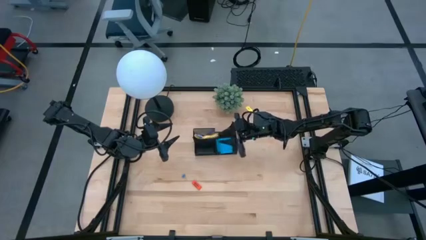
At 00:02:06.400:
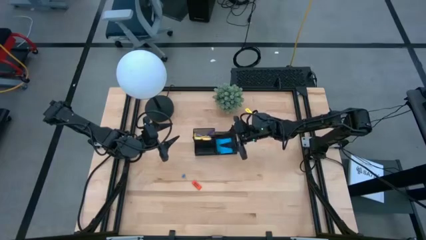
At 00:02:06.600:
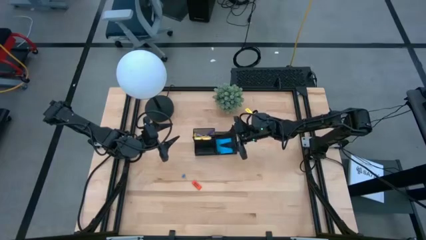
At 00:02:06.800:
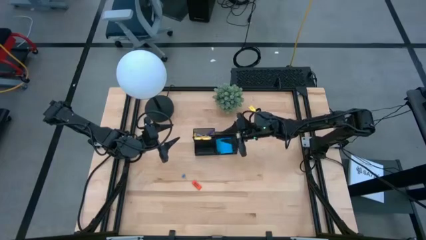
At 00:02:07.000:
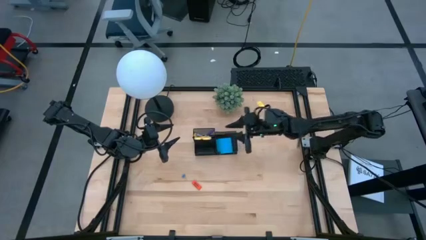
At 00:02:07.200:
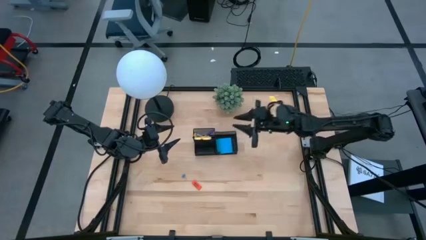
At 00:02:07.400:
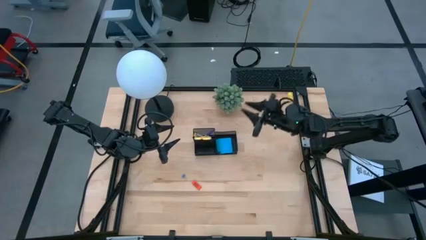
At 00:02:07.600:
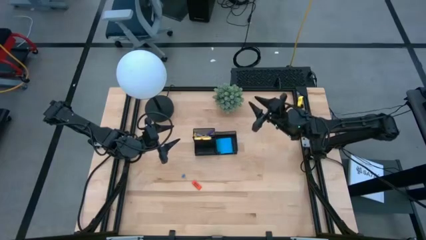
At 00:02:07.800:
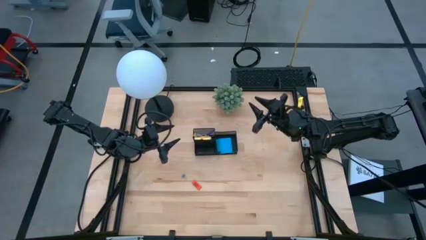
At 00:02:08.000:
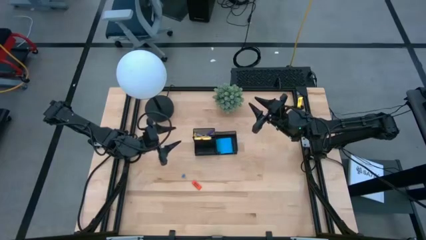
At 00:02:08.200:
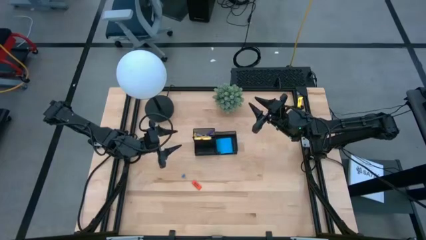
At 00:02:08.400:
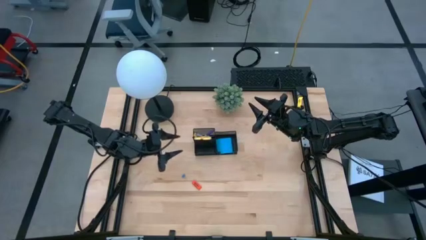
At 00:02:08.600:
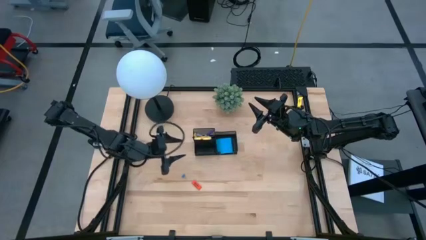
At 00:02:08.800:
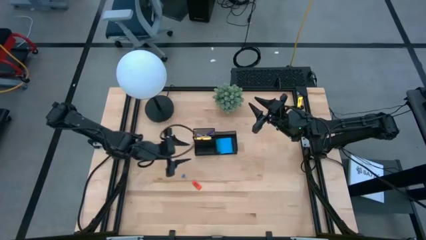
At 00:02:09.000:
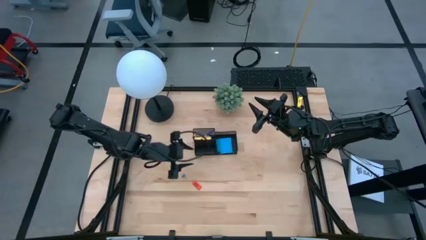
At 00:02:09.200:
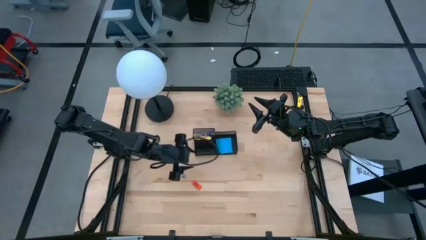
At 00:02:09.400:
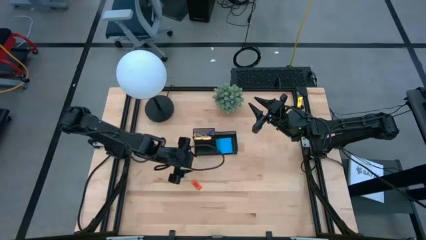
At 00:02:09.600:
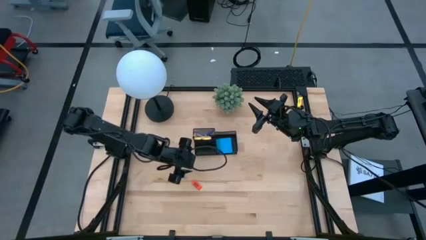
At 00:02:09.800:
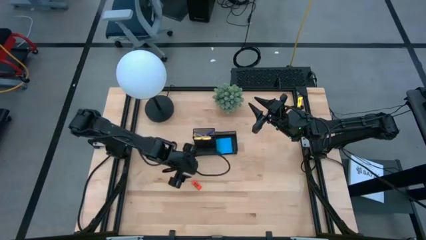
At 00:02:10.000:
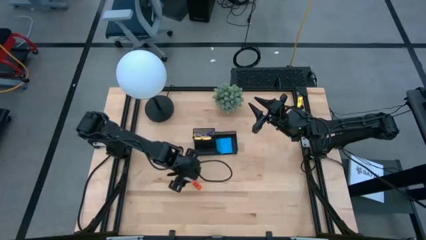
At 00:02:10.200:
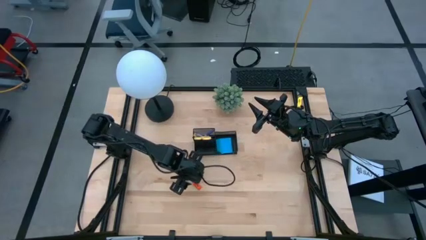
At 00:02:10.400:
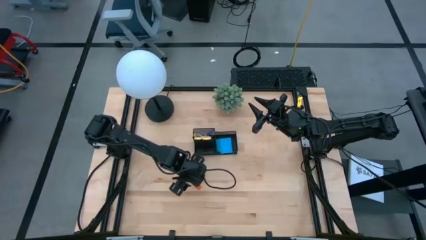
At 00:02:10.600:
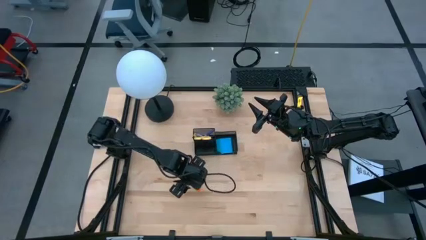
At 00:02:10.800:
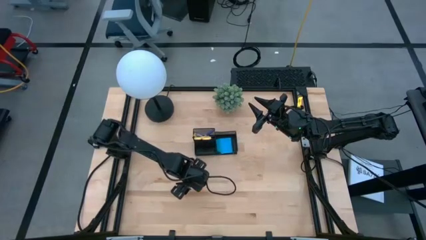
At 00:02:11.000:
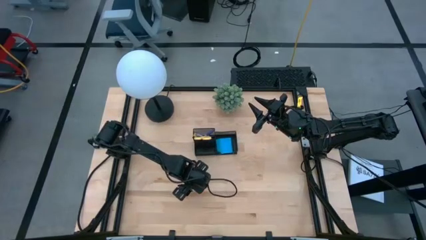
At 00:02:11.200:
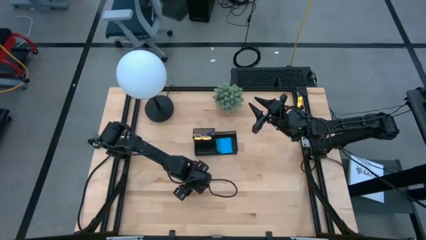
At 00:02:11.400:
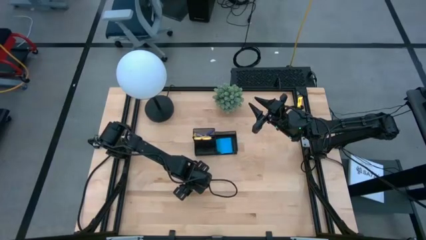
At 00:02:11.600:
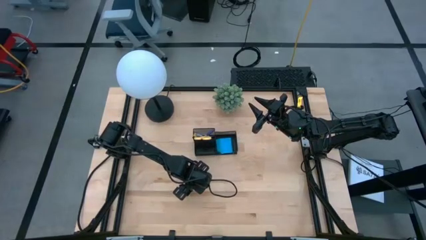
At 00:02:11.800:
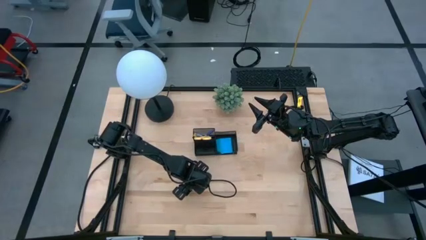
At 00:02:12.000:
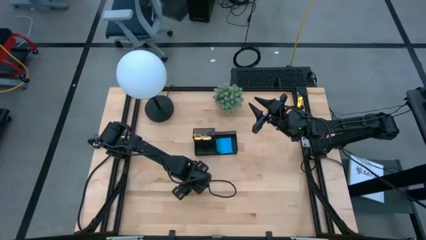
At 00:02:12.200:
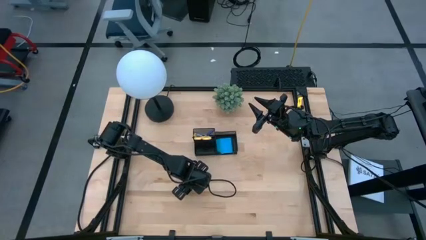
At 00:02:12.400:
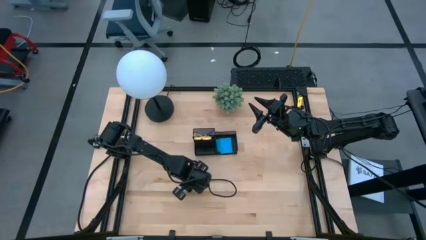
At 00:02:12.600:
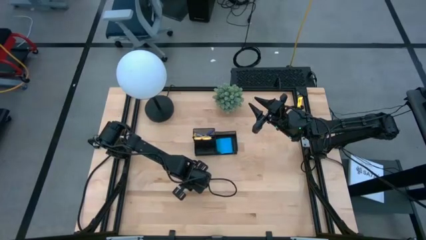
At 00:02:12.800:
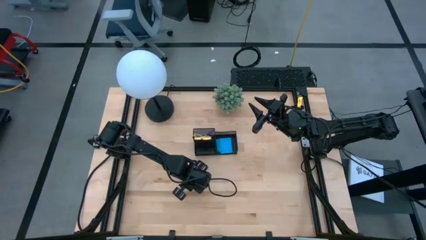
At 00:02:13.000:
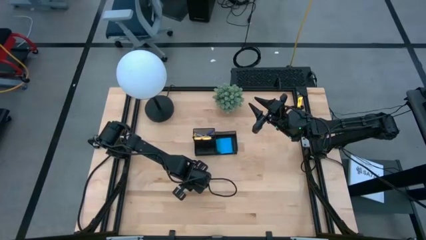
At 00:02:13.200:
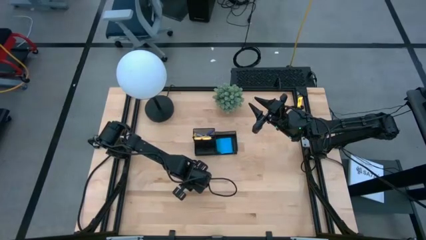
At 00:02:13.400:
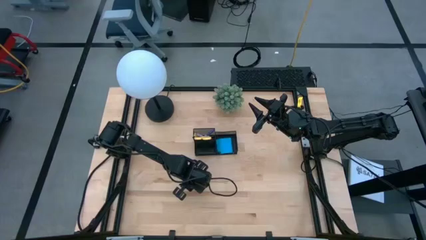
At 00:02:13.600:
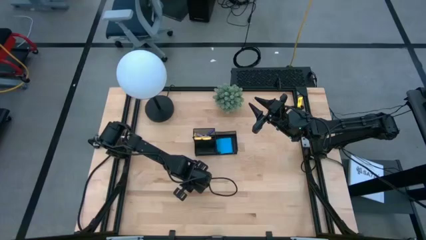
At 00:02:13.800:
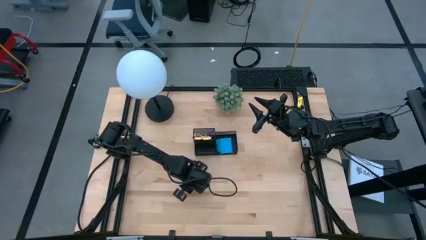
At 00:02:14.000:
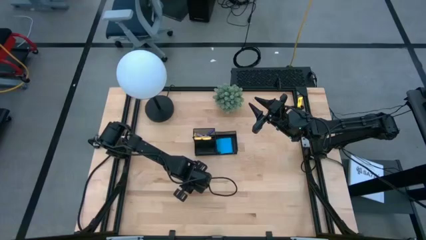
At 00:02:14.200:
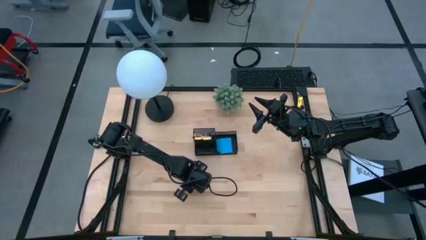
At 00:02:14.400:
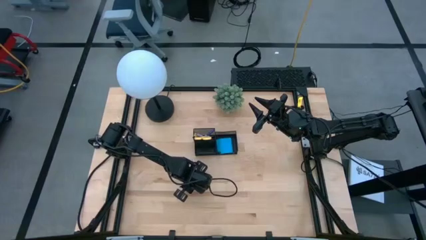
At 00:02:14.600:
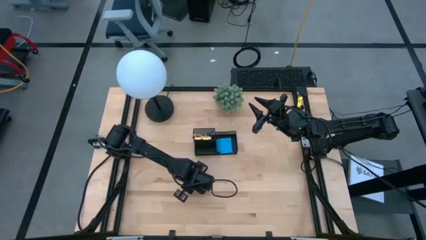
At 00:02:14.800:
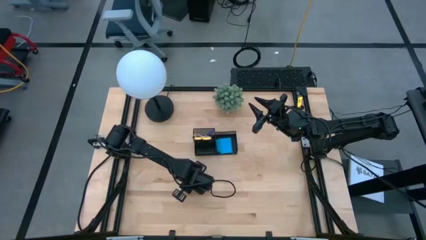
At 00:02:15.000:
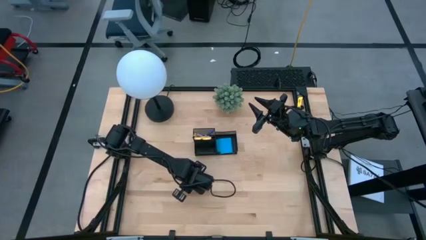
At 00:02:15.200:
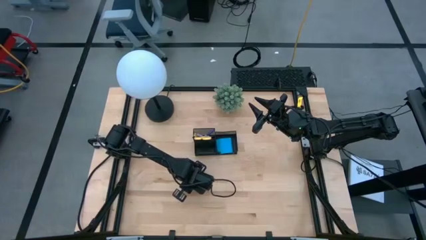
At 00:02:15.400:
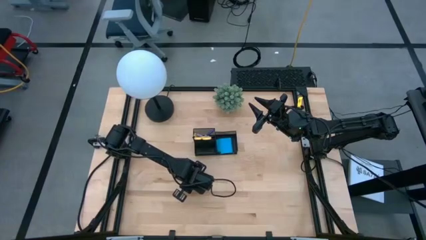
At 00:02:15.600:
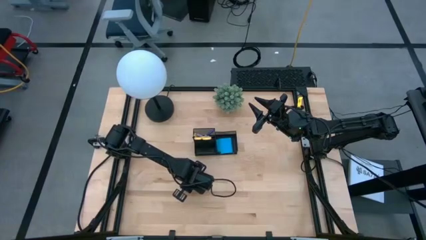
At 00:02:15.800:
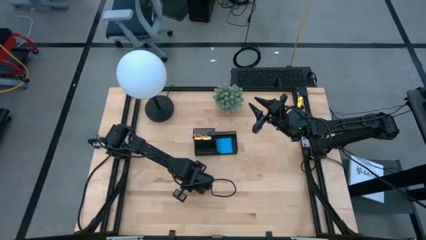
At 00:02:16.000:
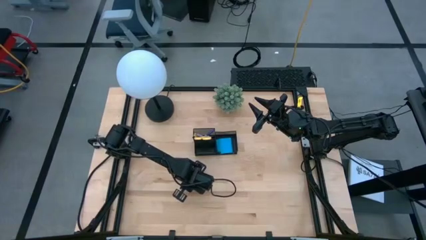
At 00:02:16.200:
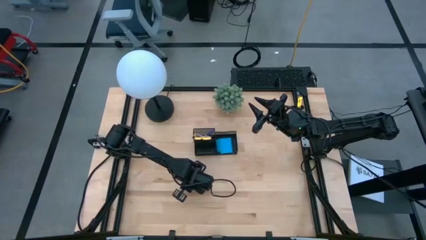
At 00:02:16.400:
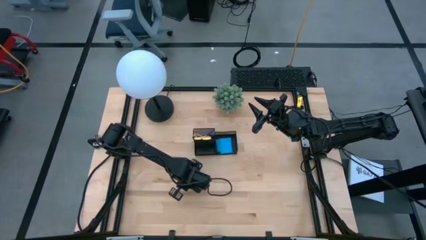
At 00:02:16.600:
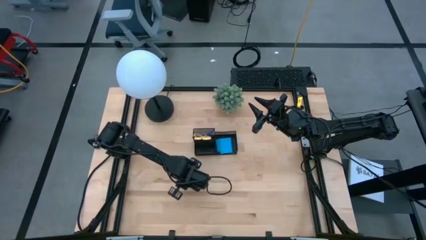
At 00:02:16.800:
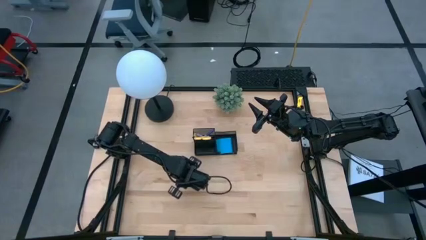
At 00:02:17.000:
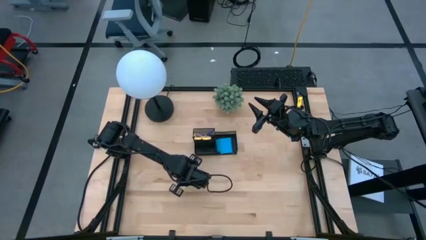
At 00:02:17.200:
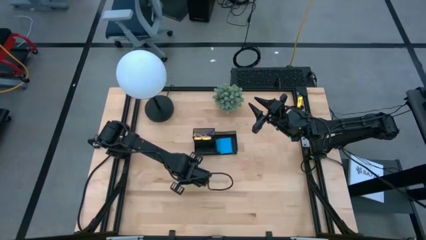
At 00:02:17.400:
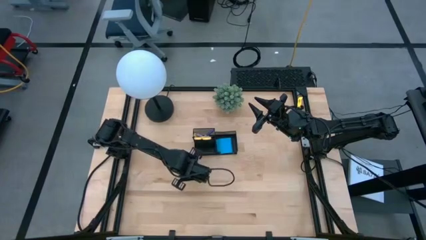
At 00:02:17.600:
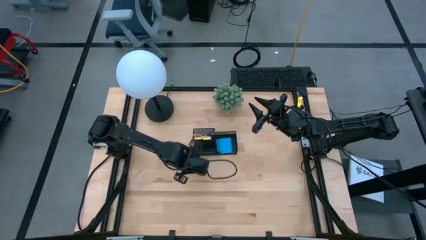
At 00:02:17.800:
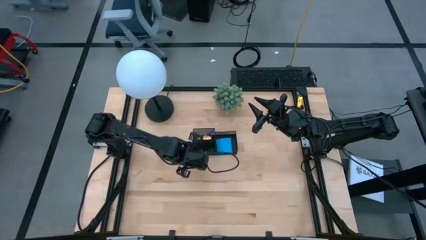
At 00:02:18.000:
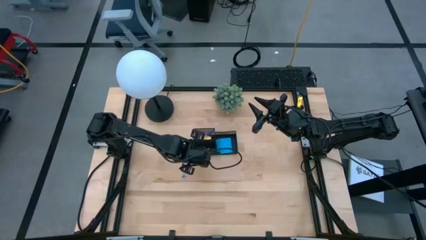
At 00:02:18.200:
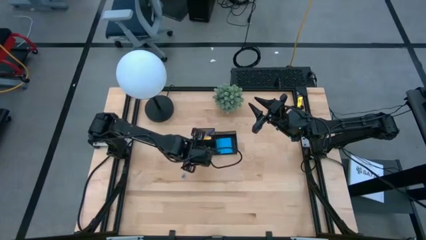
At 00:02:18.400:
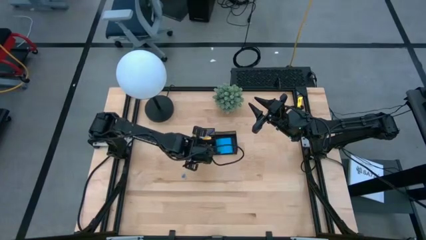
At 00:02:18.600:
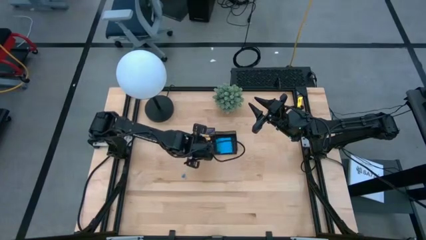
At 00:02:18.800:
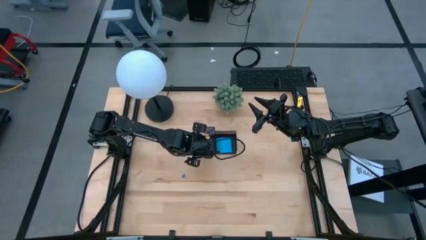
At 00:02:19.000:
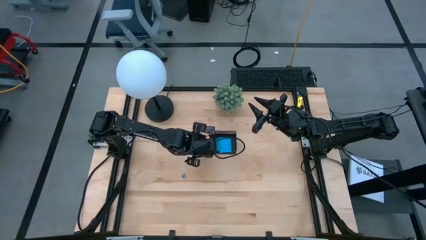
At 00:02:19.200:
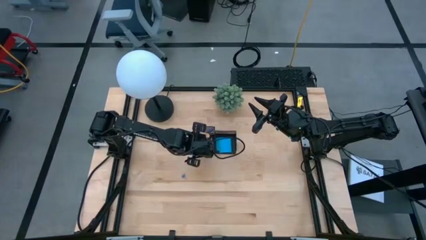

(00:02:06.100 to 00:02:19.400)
Task: Pick and place office supplies into organizer
Put the orange eraser into the desk organizer
